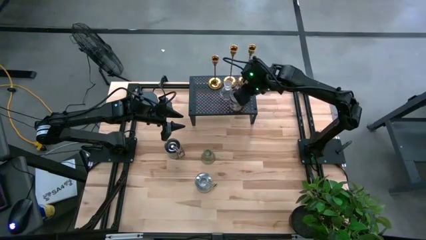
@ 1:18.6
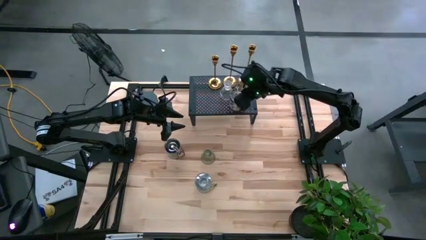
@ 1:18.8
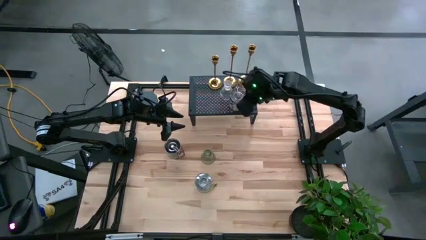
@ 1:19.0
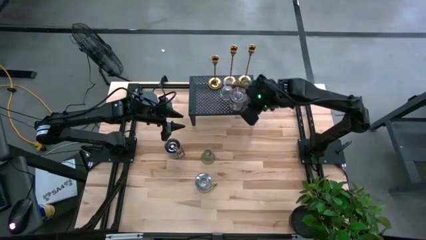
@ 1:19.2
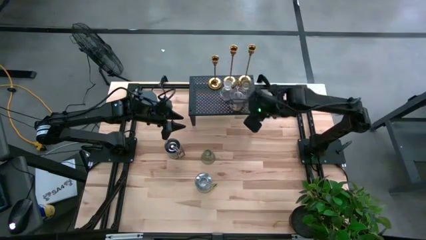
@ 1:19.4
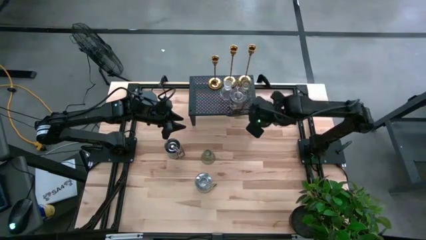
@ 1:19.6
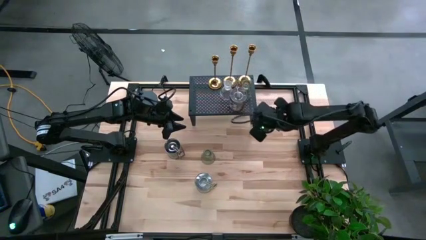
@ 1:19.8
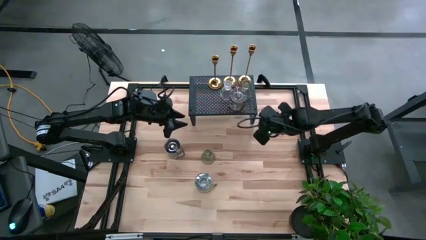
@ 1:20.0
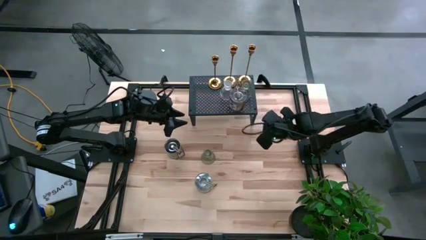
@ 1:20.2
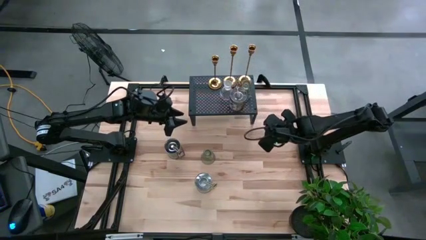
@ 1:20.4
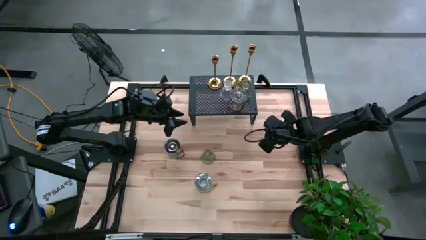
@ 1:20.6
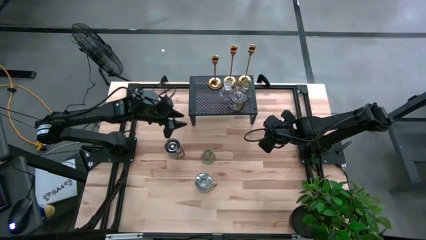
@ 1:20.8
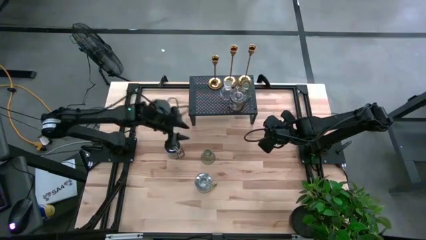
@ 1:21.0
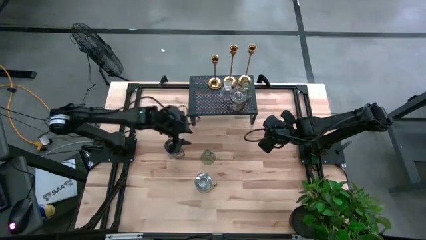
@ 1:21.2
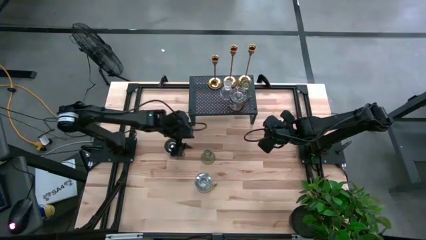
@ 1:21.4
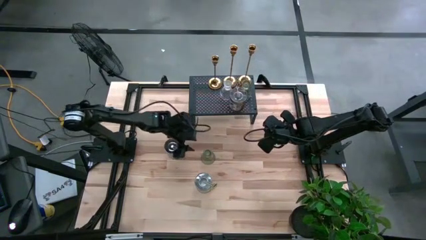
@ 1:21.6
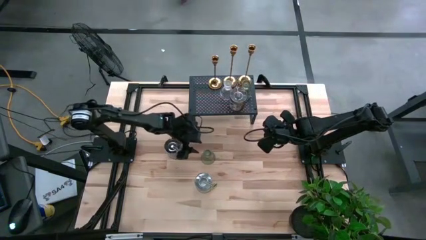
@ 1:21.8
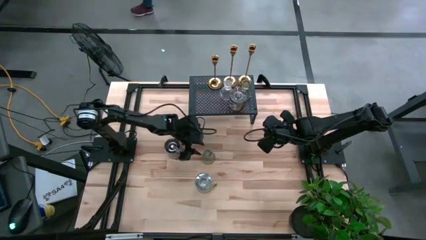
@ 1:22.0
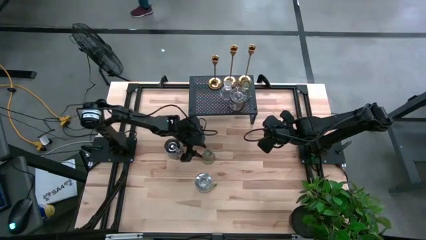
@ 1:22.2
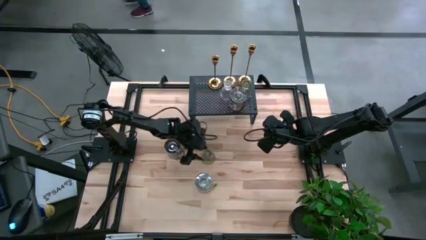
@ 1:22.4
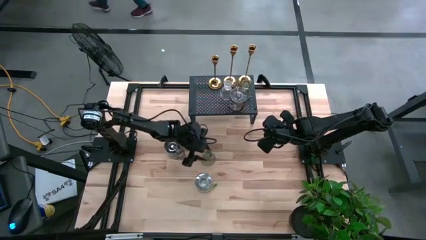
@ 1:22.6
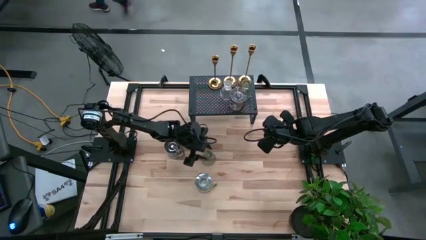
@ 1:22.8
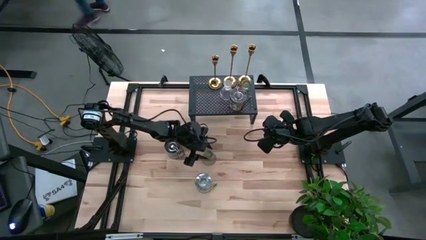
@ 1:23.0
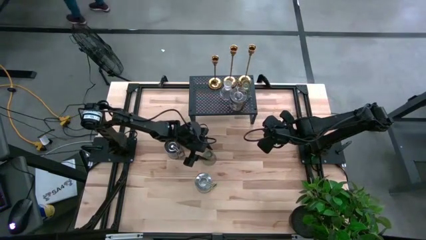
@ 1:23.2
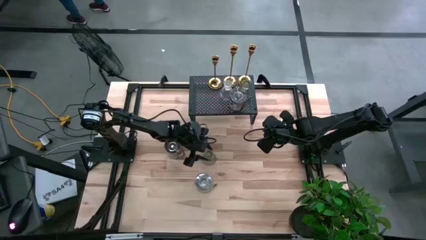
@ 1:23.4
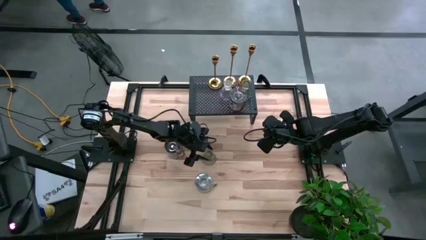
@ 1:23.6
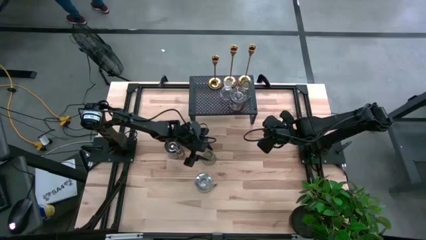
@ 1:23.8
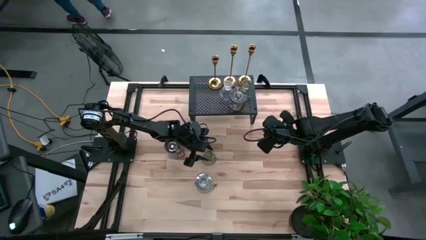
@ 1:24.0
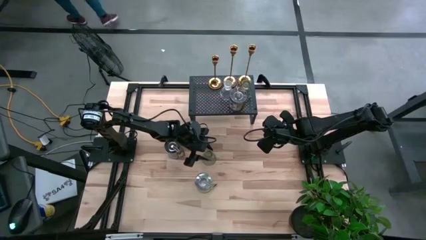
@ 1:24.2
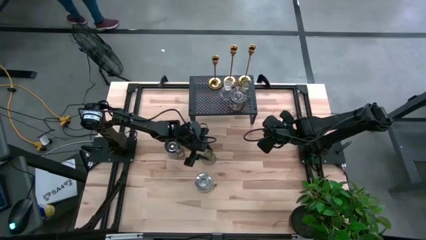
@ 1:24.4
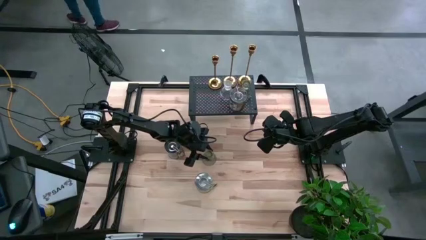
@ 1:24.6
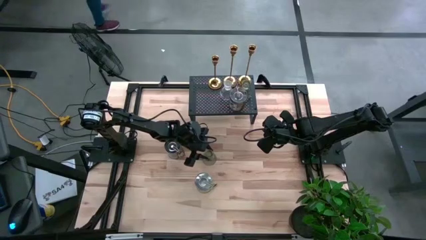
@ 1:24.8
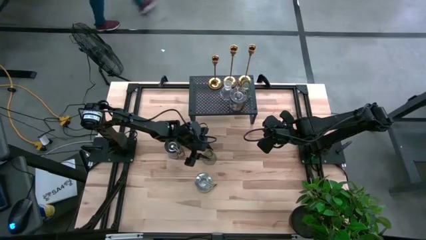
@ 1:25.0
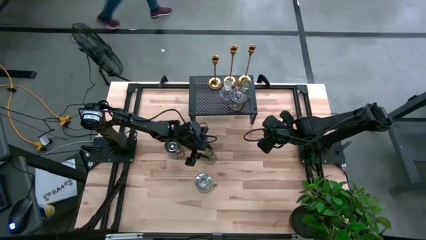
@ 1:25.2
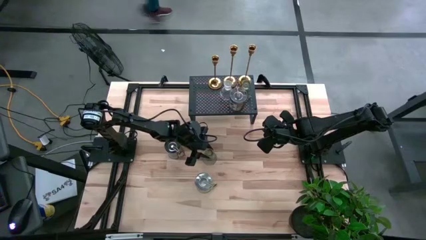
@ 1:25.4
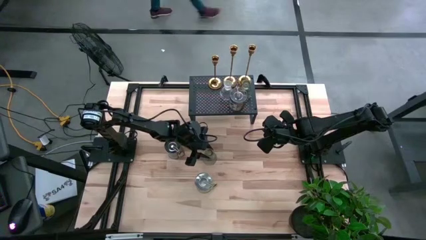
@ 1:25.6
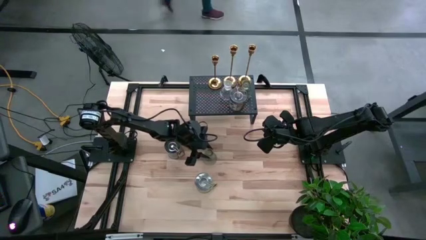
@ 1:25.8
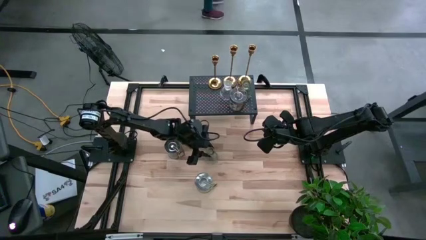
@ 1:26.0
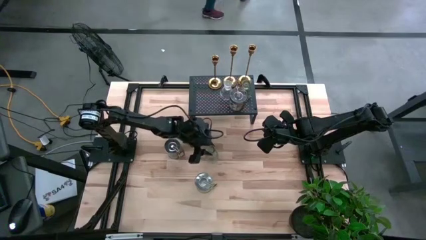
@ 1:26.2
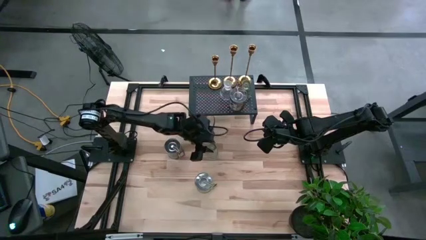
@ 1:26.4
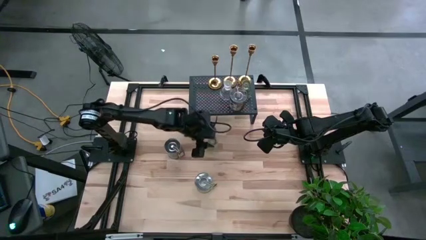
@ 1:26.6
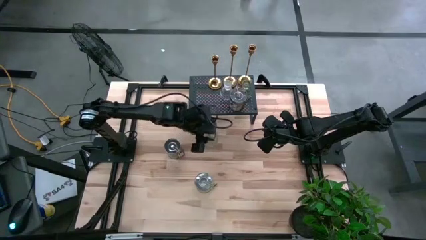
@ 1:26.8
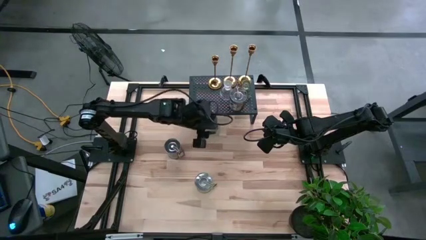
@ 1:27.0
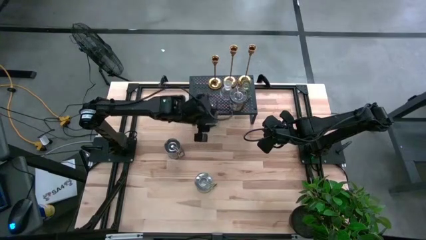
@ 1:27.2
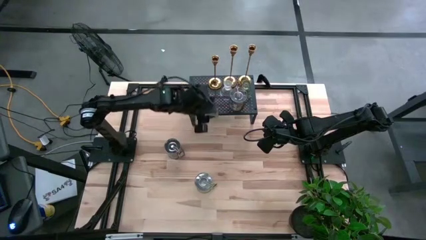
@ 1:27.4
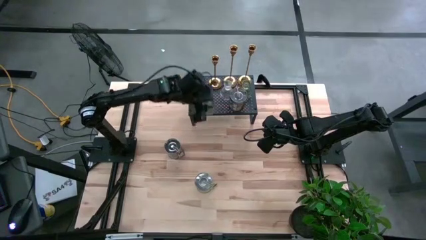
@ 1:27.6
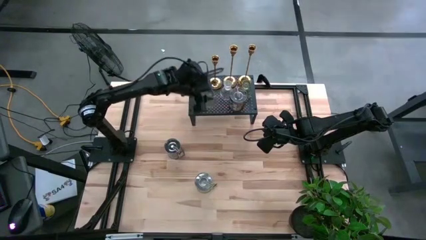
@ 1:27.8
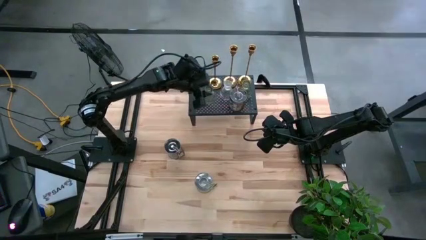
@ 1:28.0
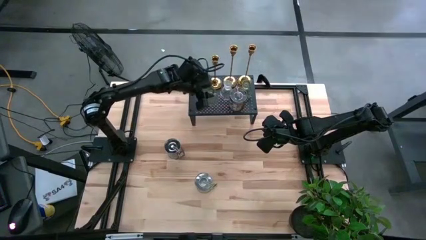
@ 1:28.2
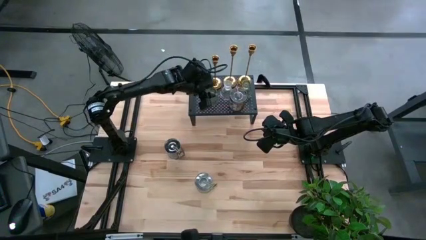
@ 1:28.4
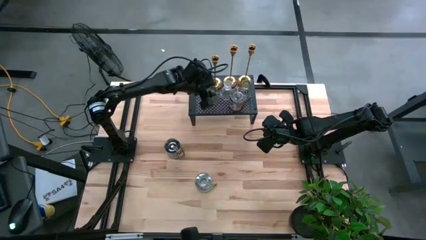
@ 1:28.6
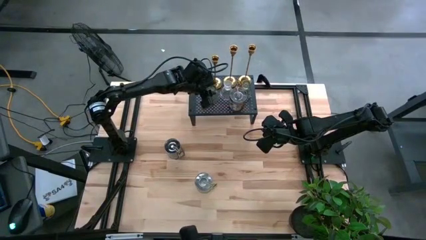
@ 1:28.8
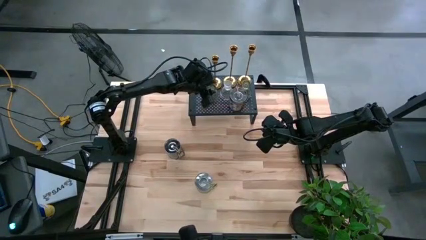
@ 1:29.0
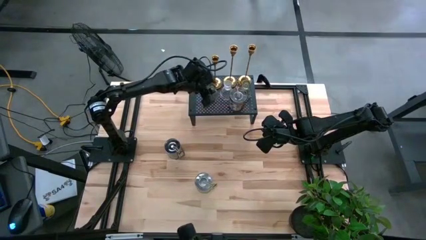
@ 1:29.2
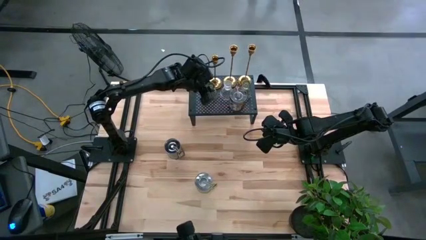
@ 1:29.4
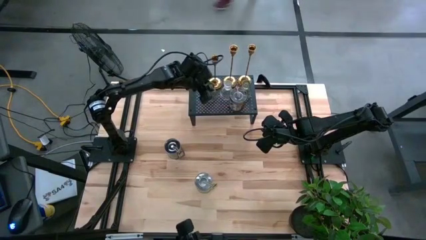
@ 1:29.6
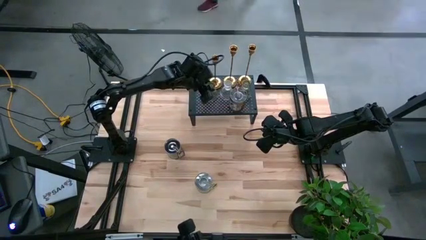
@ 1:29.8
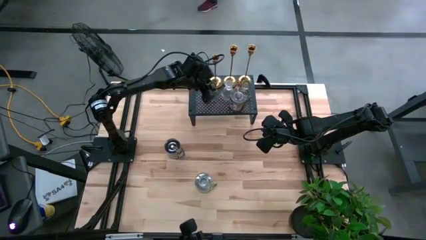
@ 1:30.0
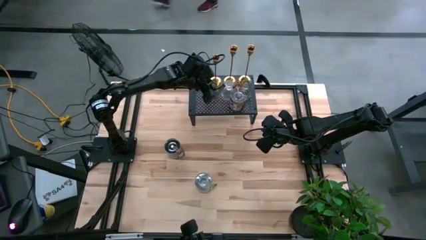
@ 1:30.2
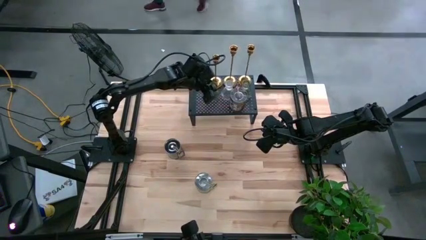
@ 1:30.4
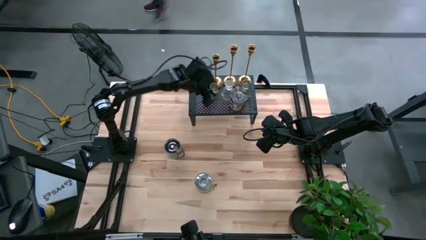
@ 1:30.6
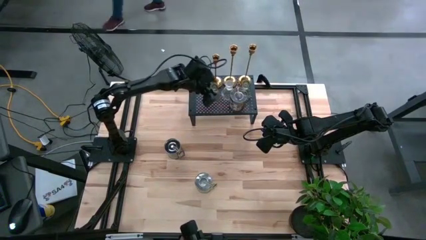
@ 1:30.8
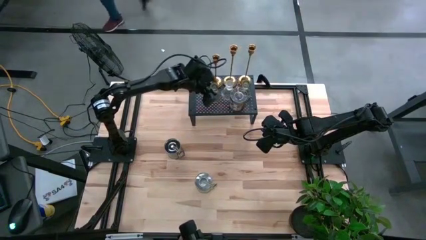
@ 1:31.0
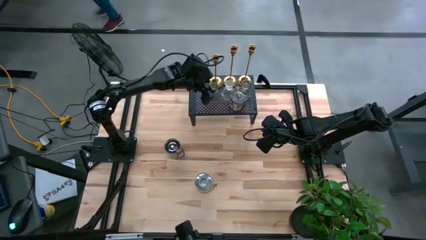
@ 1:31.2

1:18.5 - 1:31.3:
Task: Pick & Place candle stick holders
Put the green candle holder on the shelf aligned with the transparent candle holder
